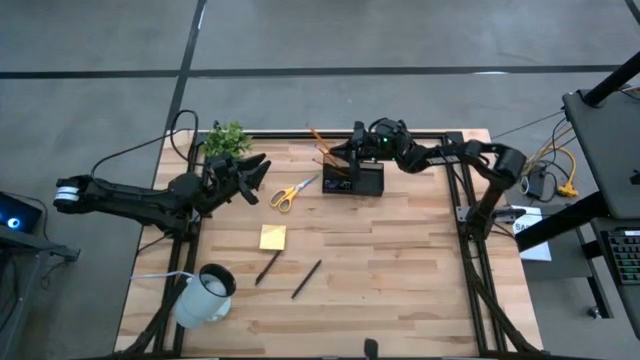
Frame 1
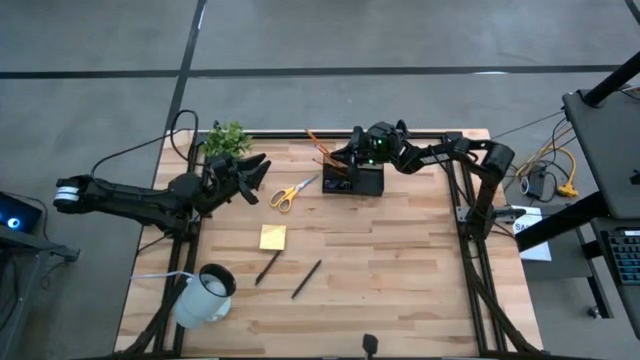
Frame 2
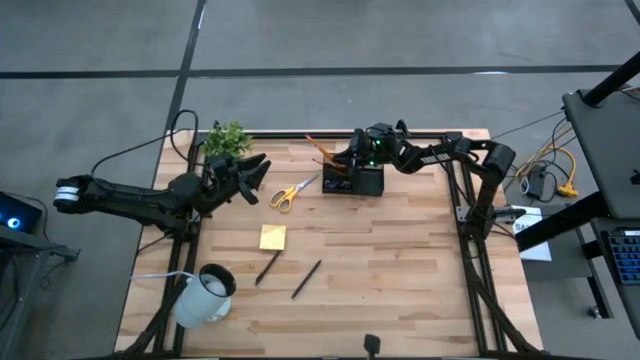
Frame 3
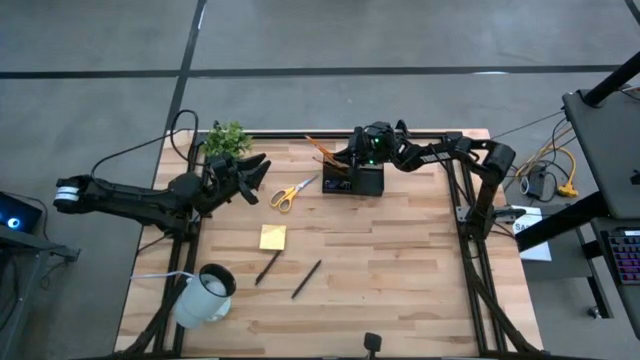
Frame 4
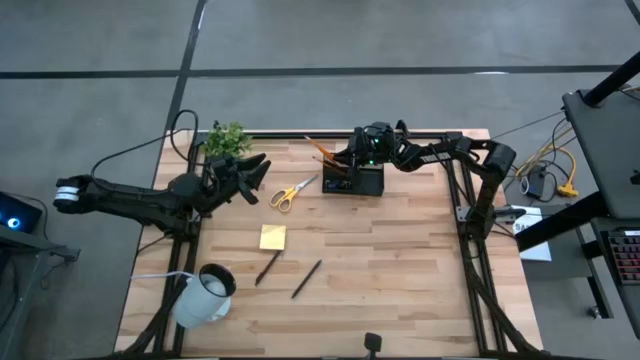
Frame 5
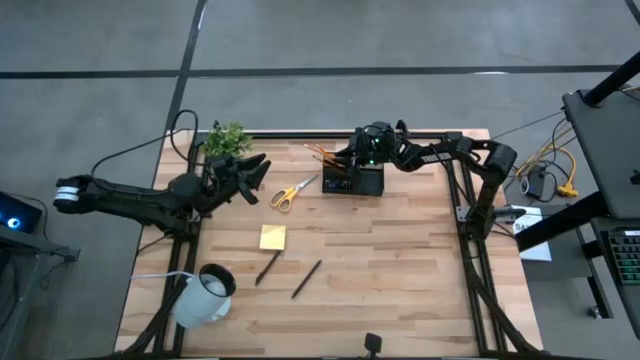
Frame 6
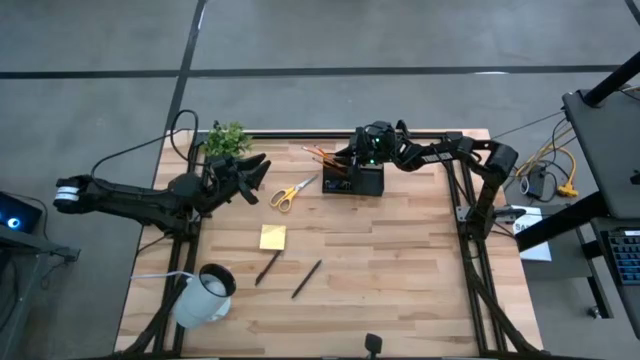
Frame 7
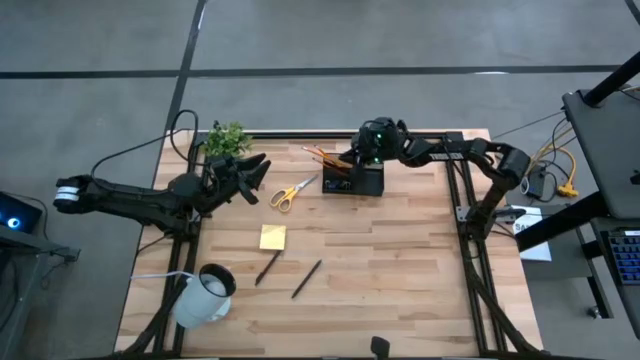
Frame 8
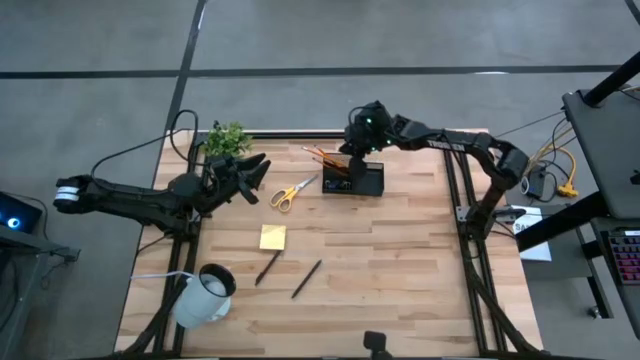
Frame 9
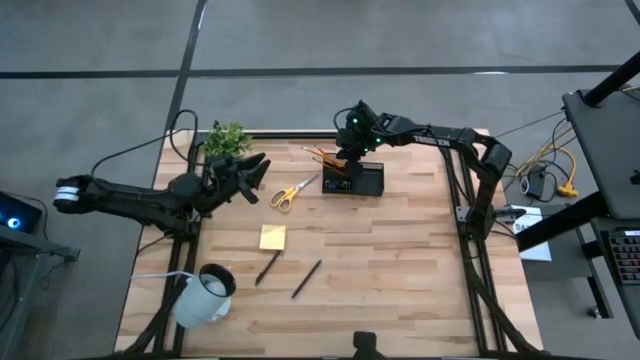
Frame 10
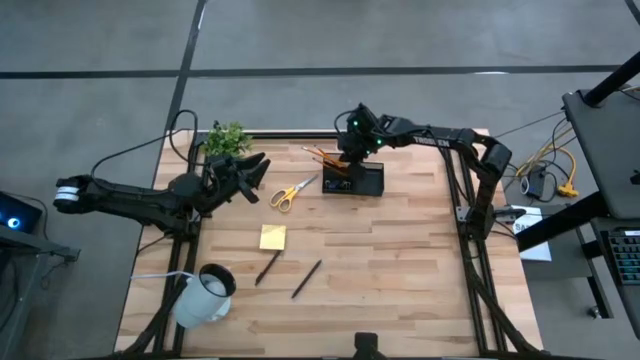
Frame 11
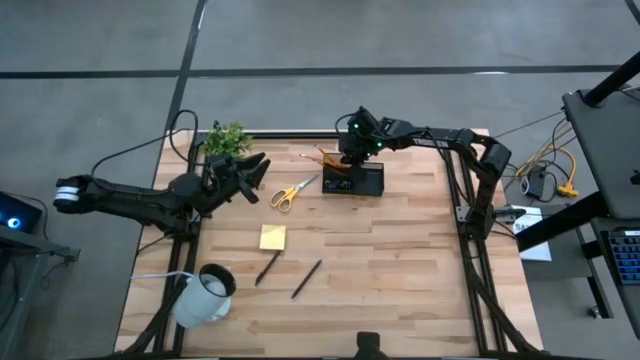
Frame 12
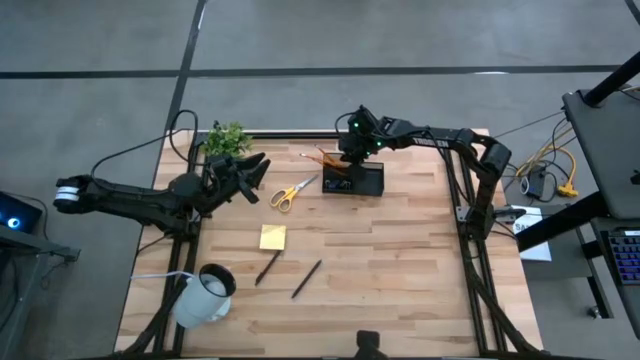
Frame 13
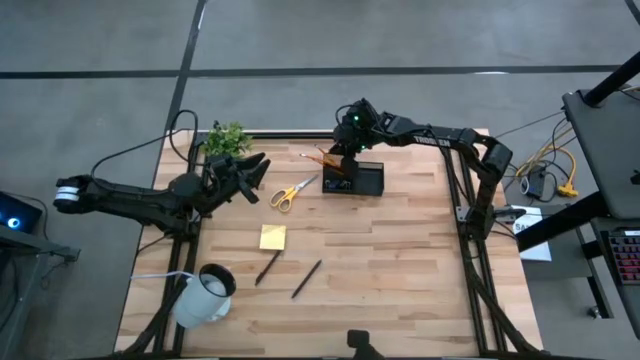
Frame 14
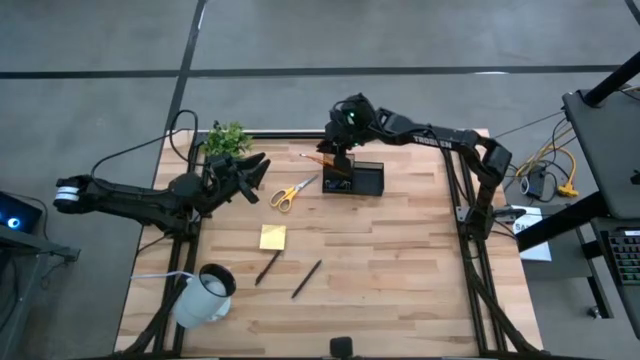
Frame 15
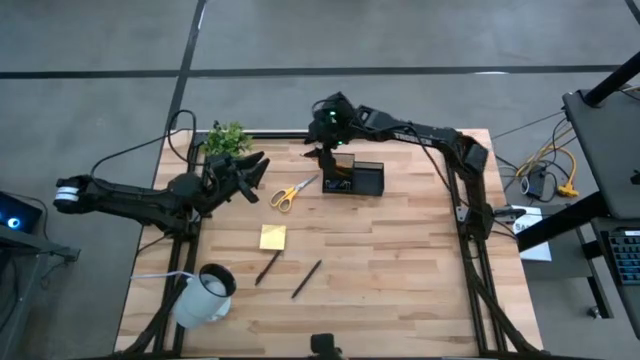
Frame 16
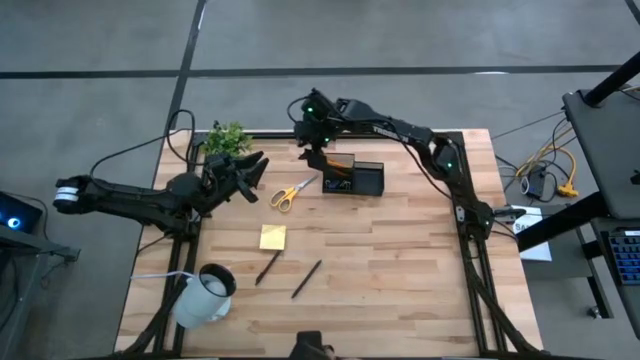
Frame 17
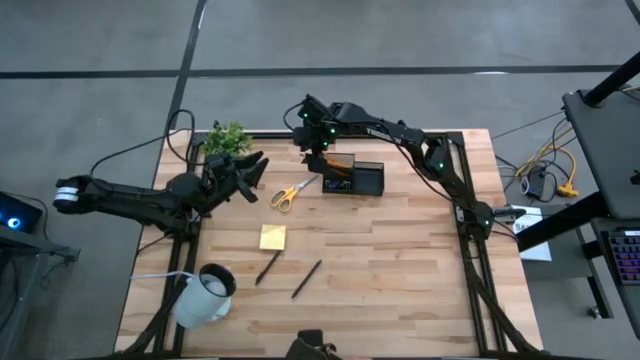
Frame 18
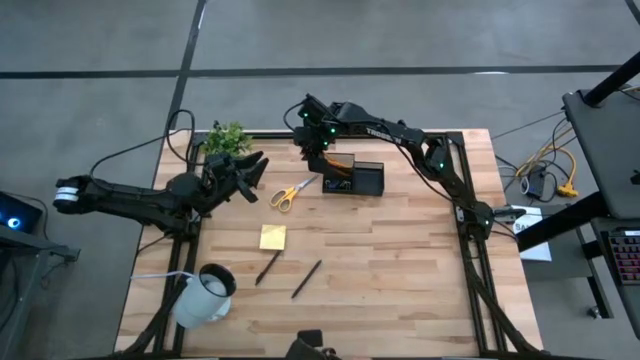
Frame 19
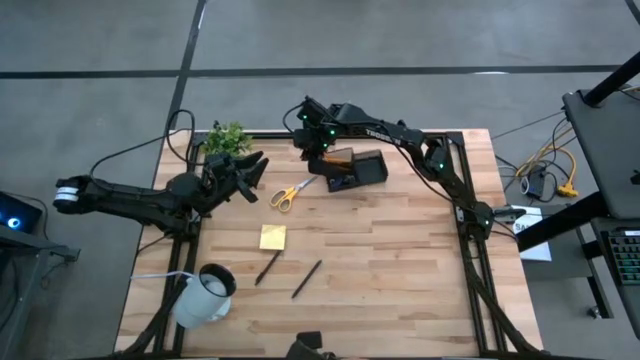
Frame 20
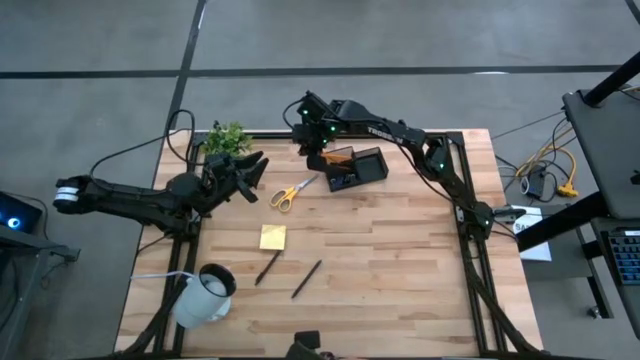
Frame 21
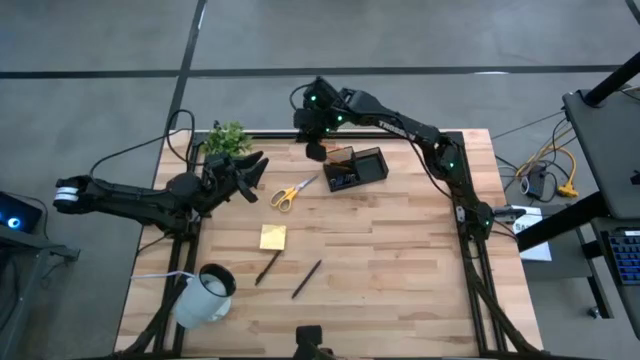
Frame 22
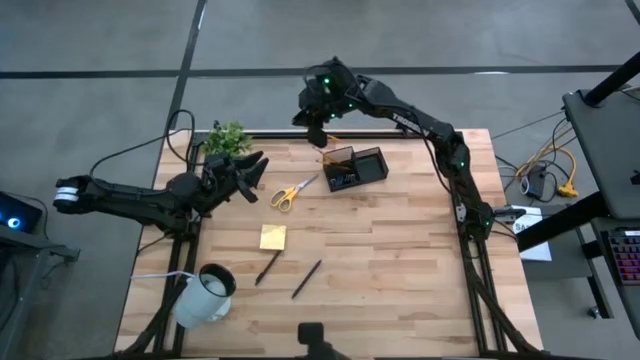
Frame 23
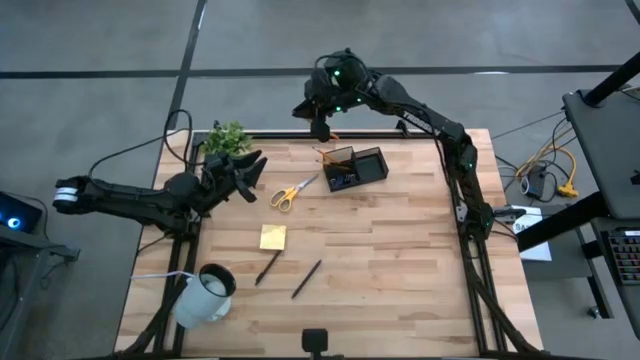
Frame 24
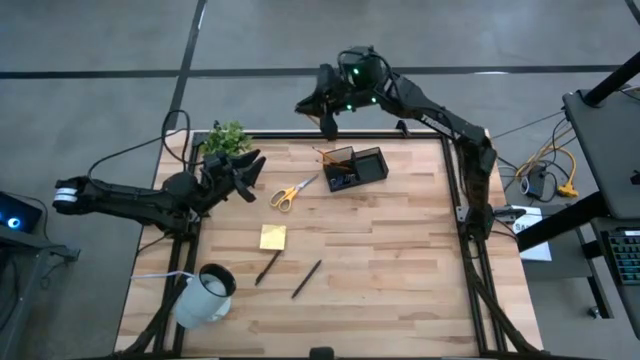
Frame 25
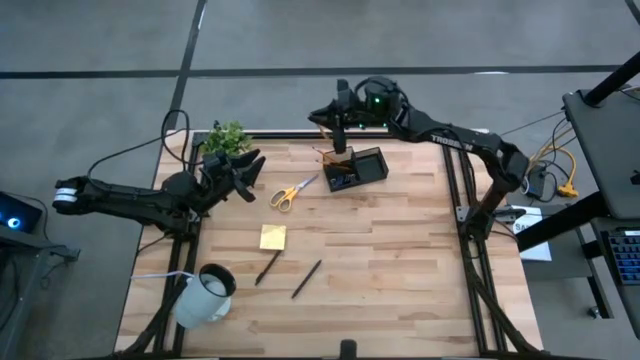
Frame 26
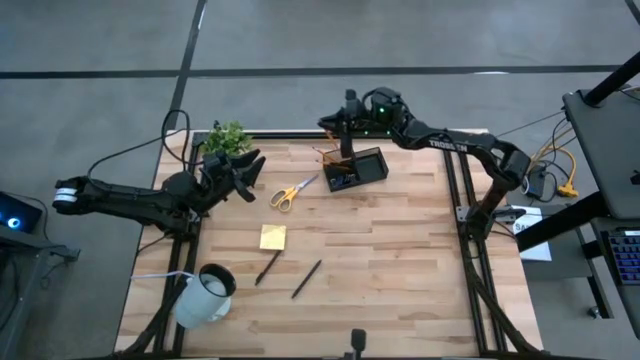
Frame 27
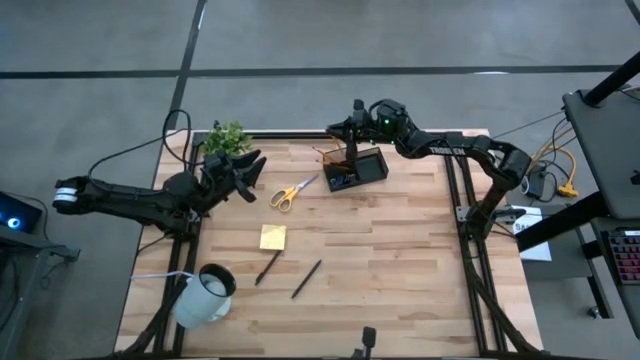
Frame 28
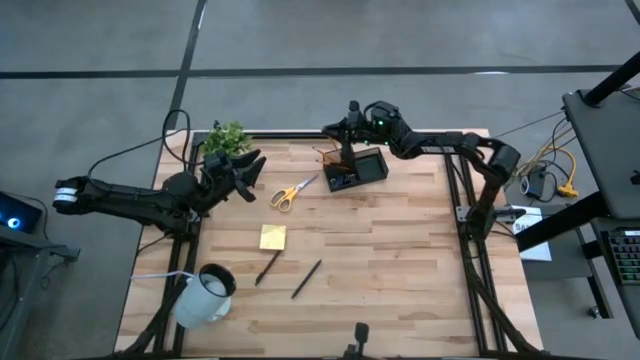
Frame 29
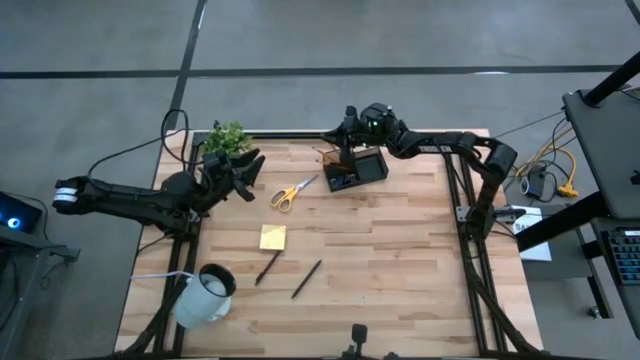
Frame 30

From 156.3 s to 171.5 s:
Task: Pick and place office supplies into organizer
Put the pencil into the desk organizer

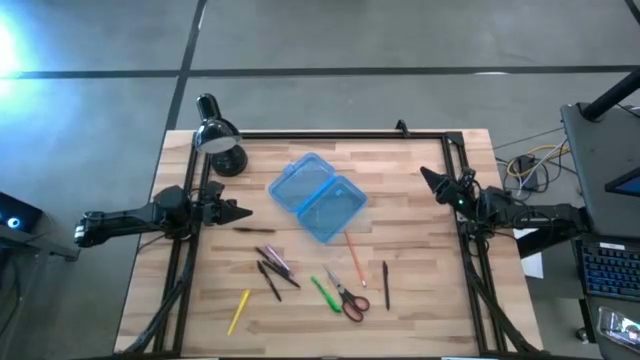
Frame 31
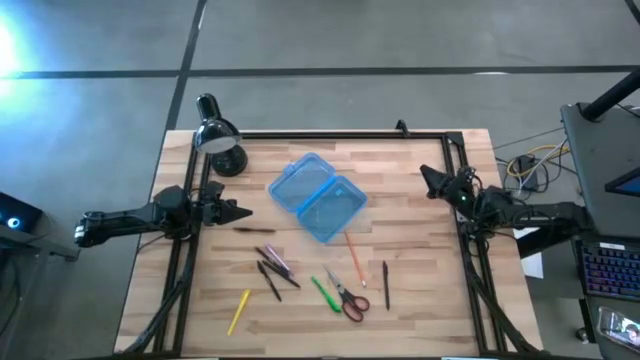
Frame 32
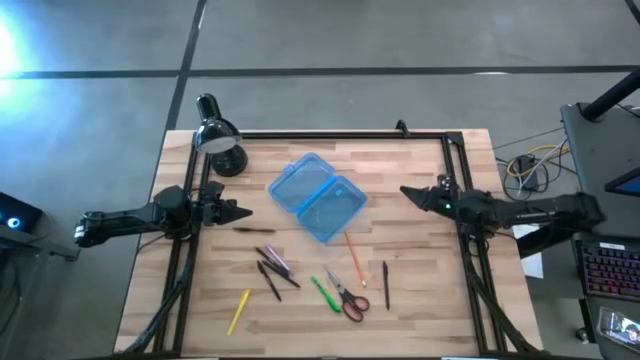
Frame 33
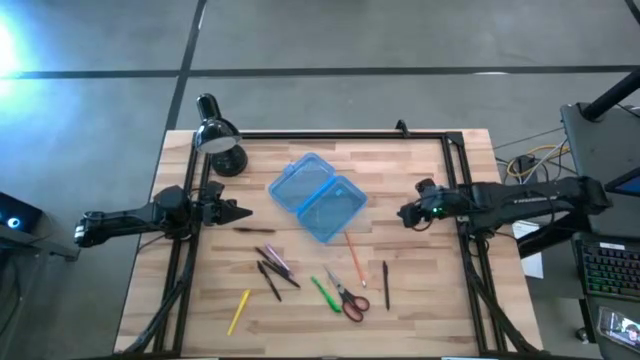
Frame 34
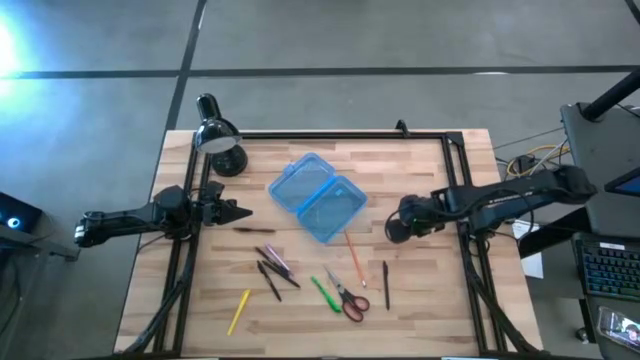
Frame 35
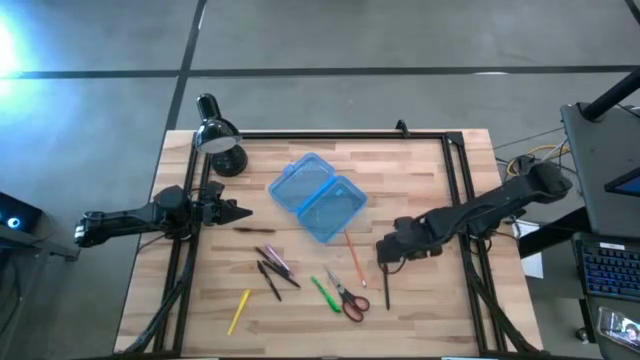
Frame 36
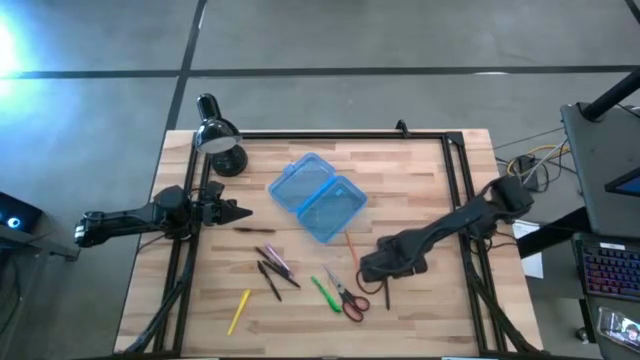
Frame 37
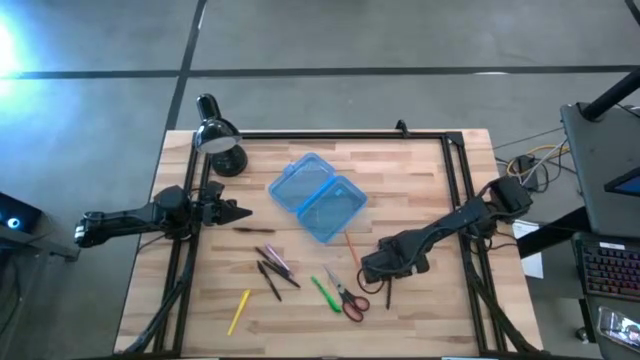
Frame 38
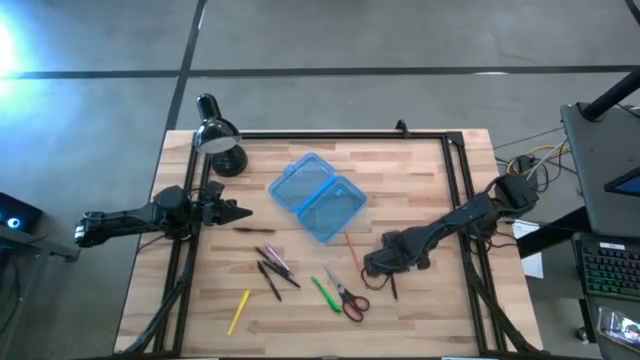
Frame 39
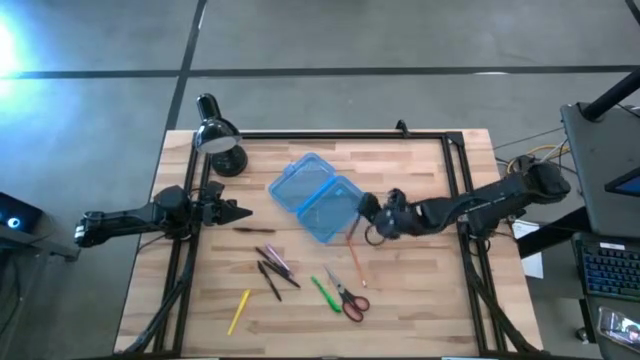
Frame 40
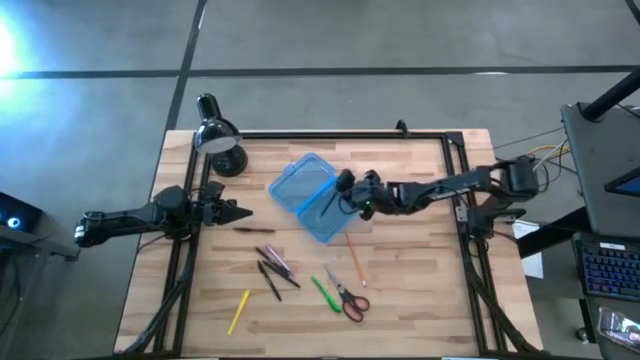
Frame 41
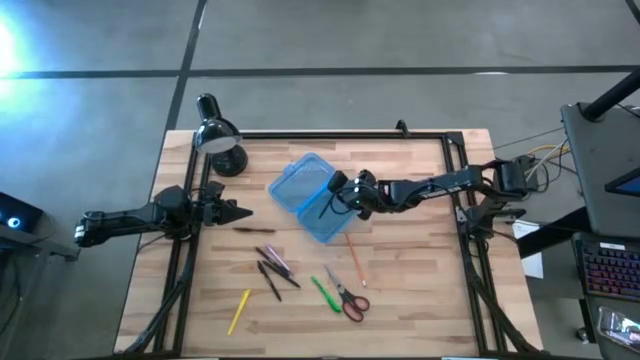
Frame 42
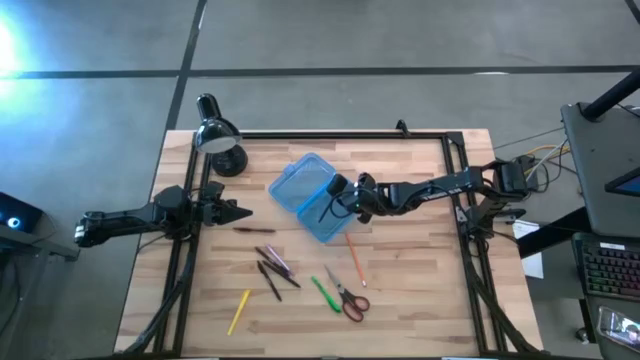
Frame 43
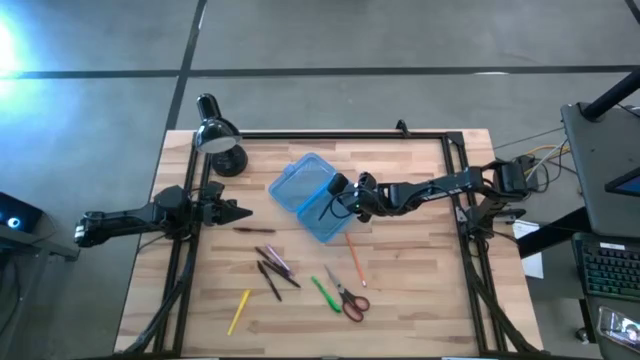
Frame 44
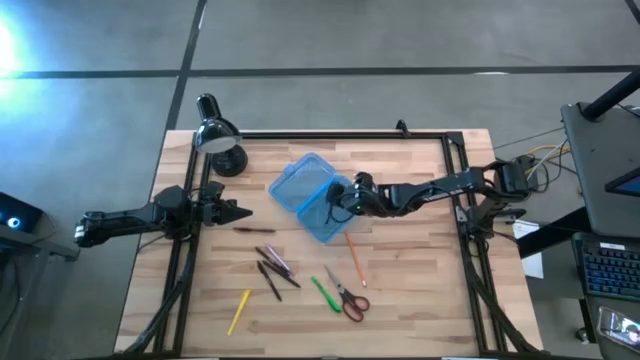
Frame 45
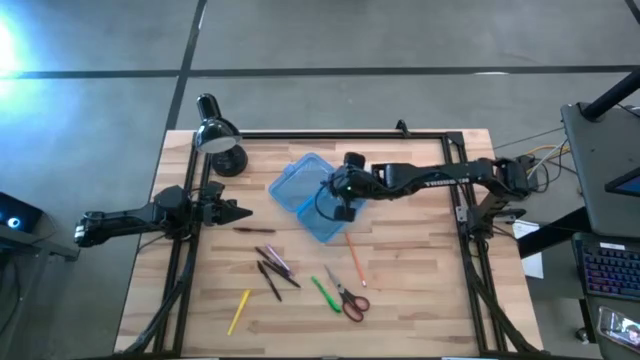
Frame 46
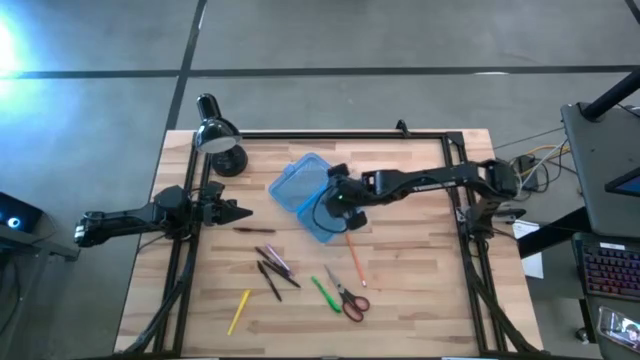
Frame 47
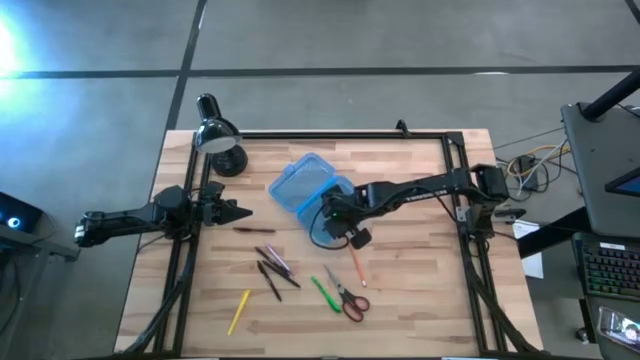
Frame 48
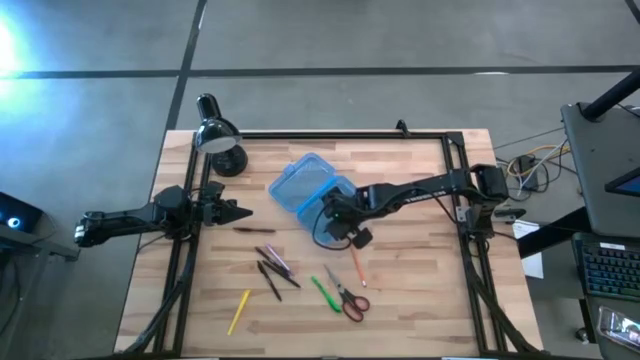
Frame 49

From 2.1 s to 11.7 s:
Task: Pick & place school supplies into a supply box
Put the black pen into the supply box
